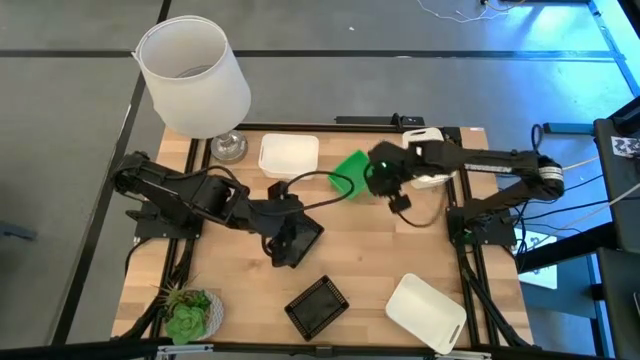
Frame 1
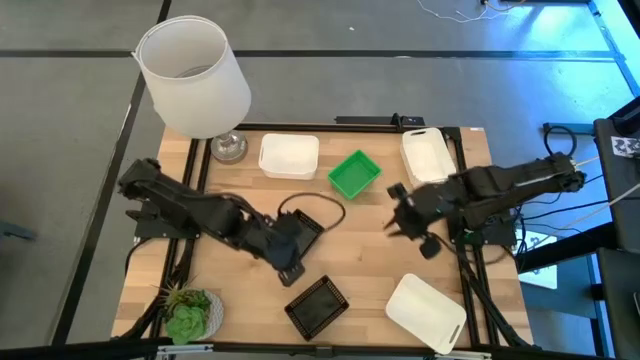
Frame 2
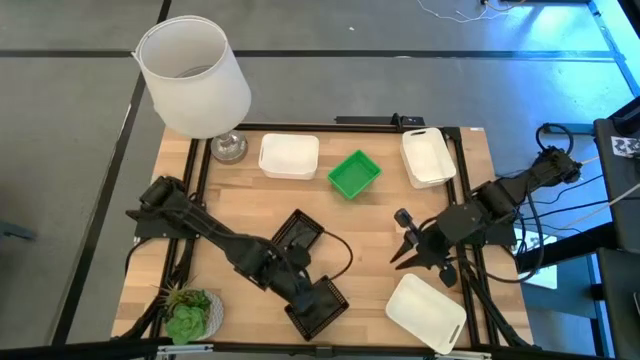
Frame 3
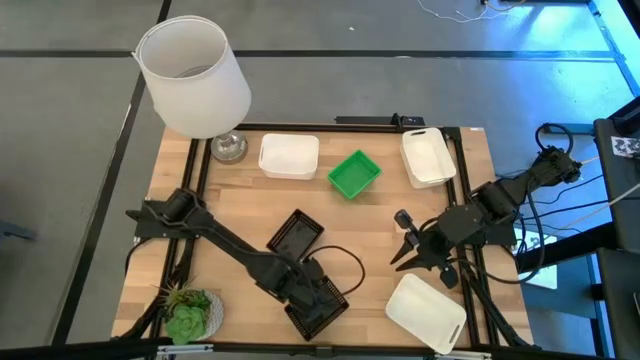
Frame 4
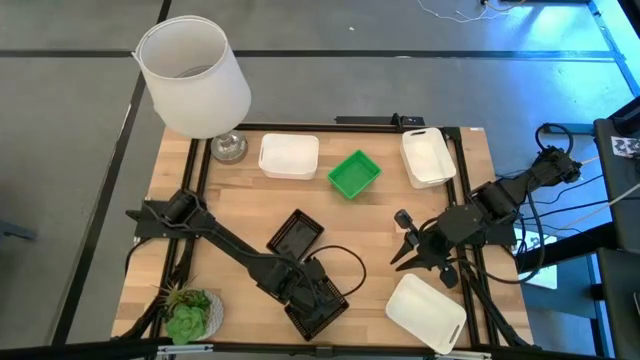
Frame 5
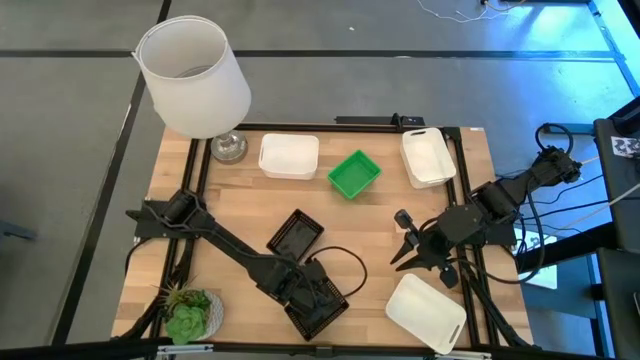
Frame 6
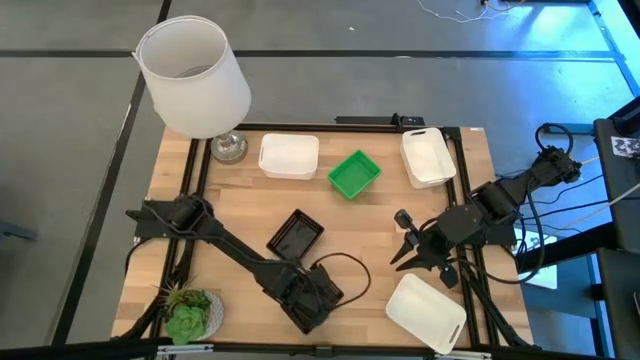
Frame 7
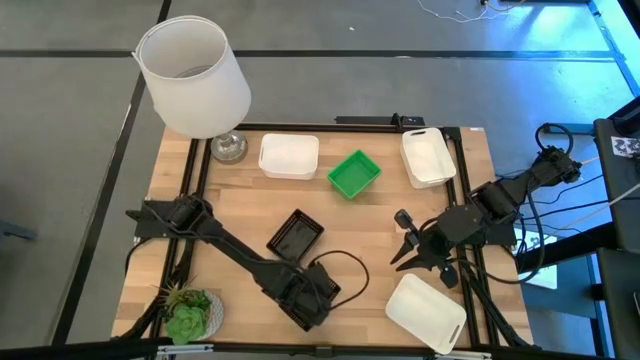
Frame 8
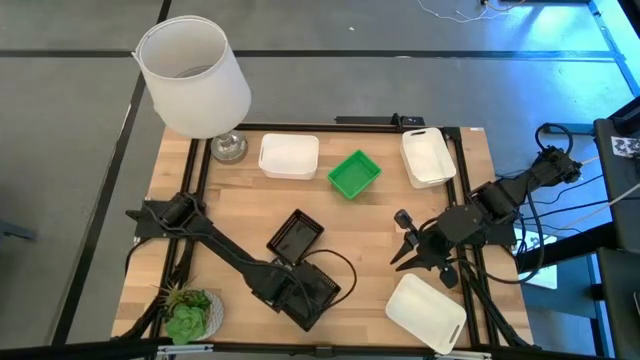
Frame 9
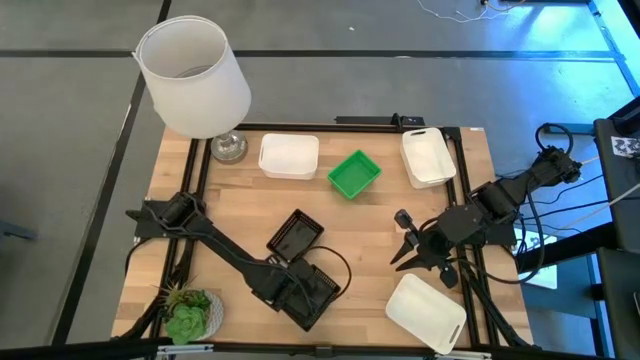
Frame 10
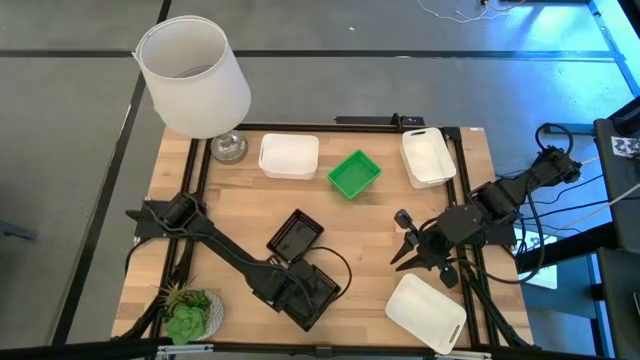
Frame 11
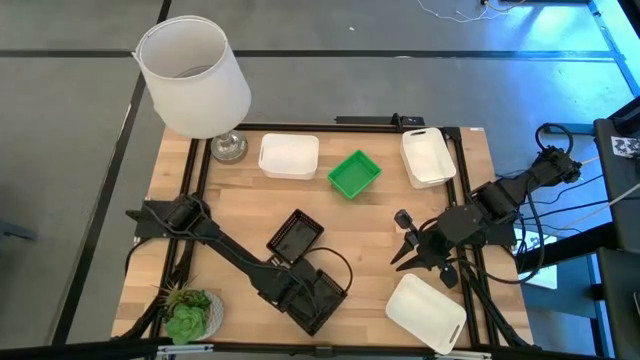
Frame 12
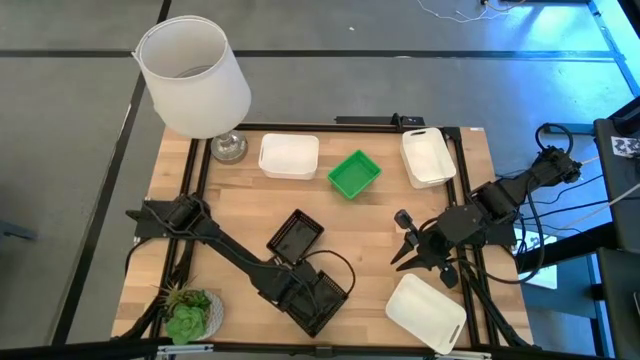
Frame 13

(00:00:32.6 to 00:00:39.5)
Stack the bottom black bin on the stacked black bins

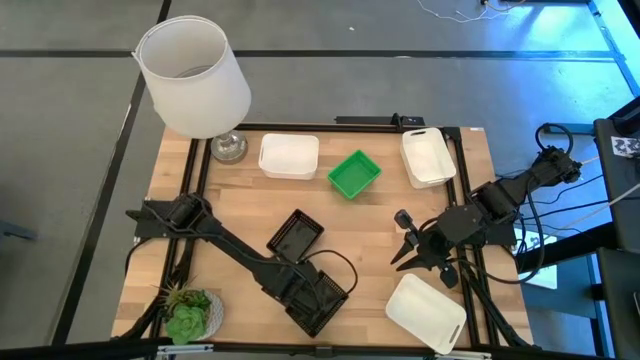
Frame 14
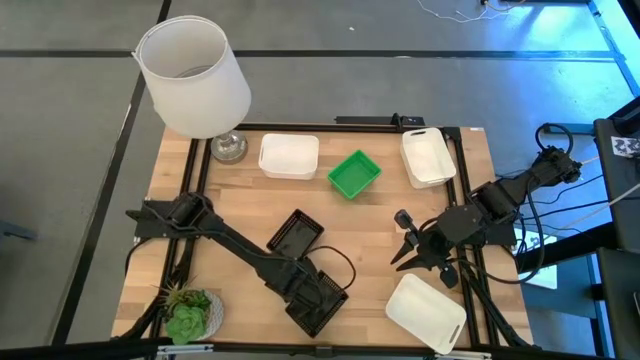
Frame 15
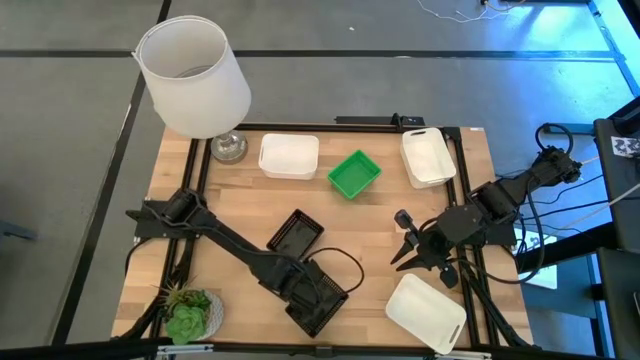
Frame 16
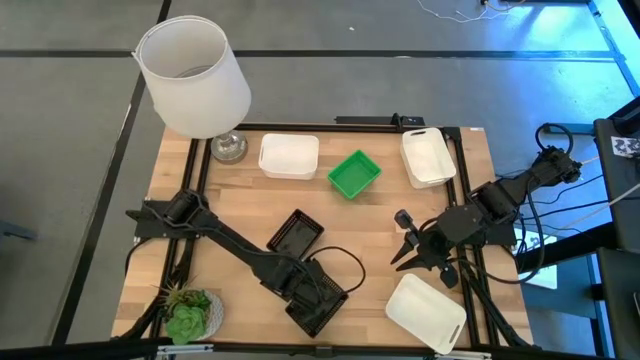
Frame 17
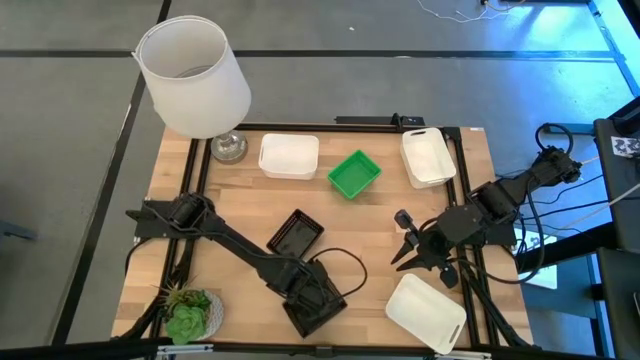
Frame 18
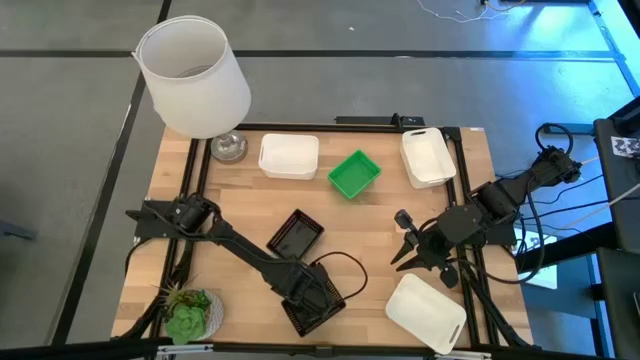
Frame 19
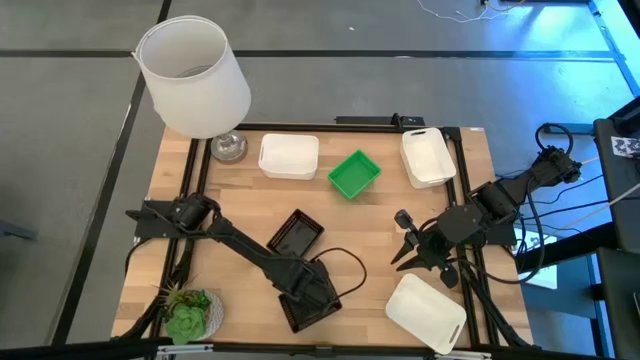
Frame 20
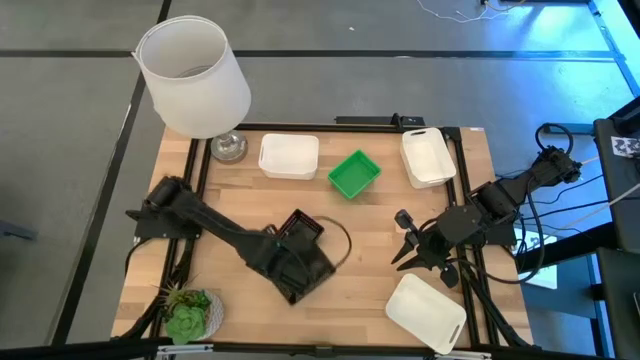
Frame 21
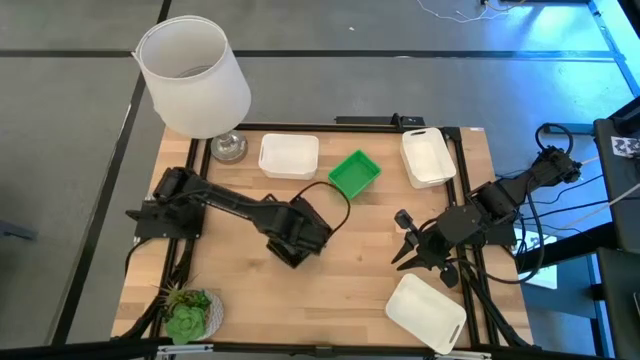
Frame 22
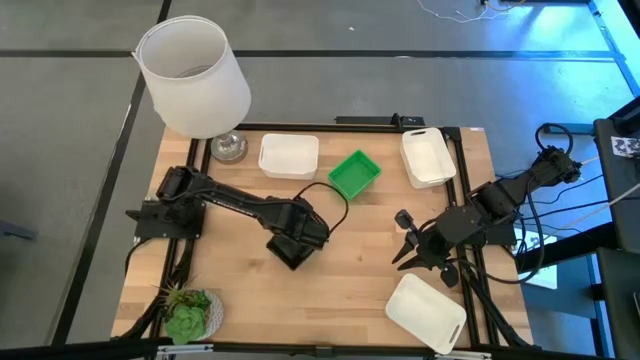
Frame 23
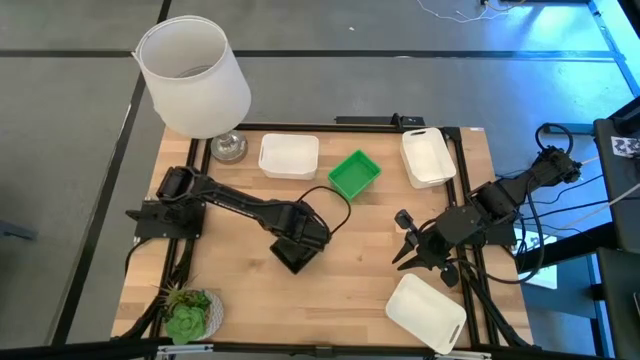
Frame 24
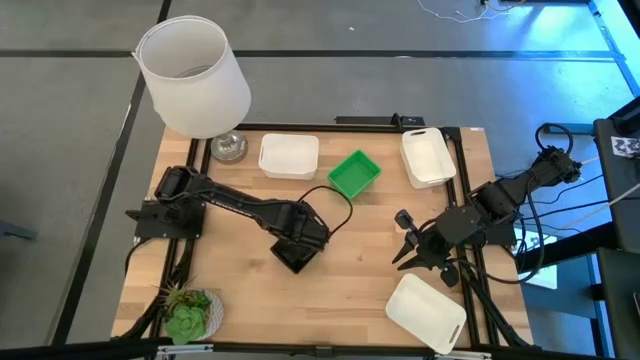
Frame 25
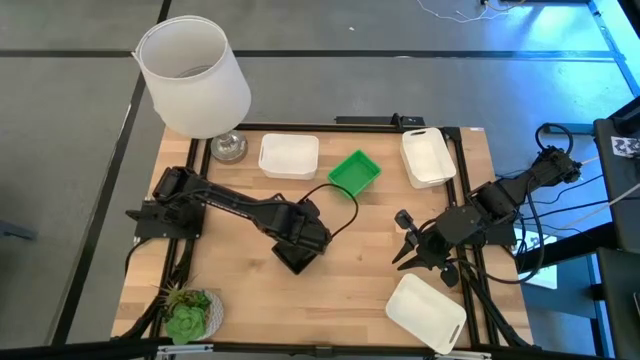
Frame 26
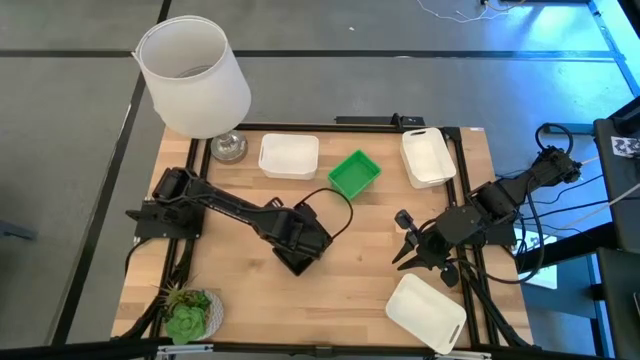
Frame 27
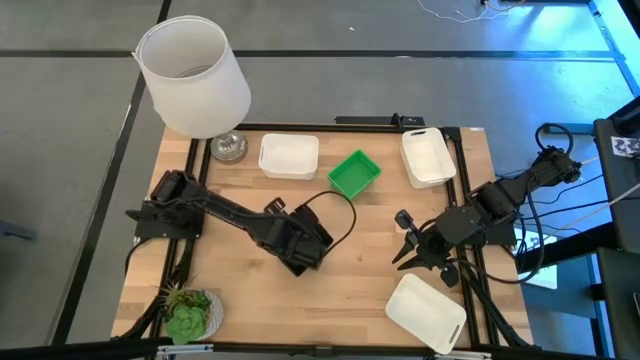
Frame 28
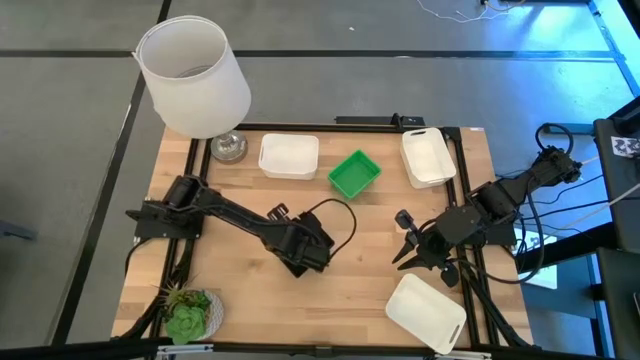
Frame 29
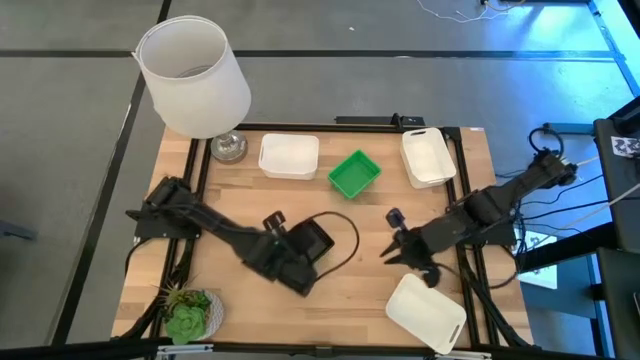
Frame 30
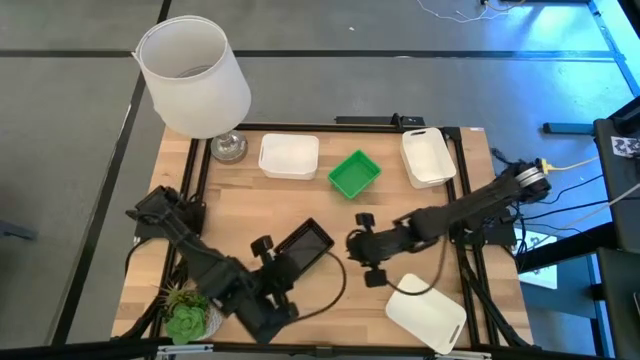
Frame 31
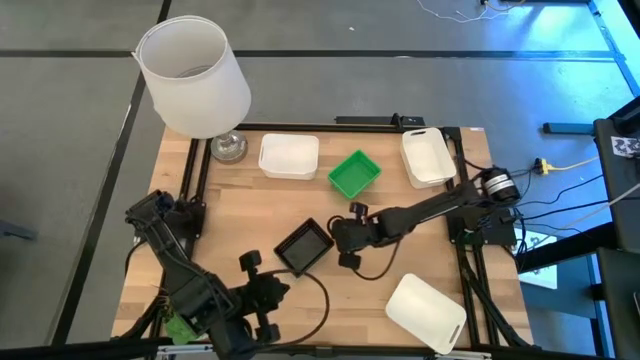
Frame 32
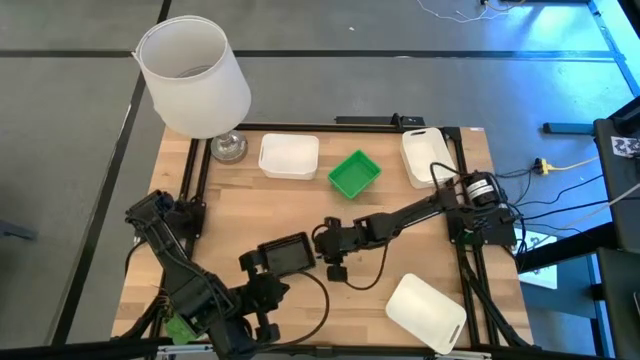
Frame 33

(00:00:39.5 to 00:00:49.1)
Stack the bottom black bin on the stacked black bins

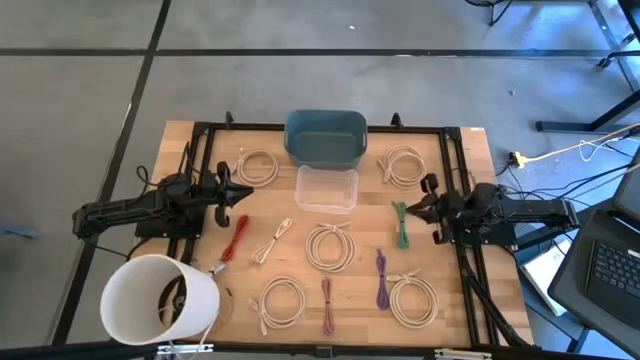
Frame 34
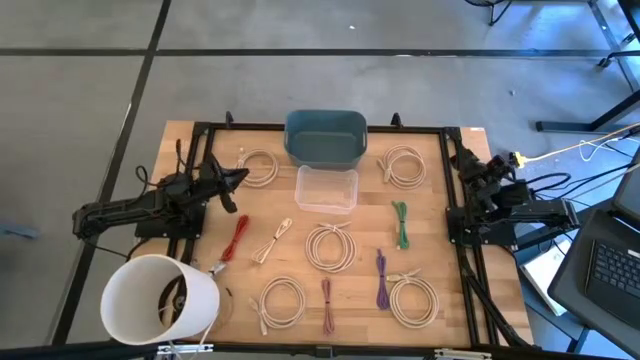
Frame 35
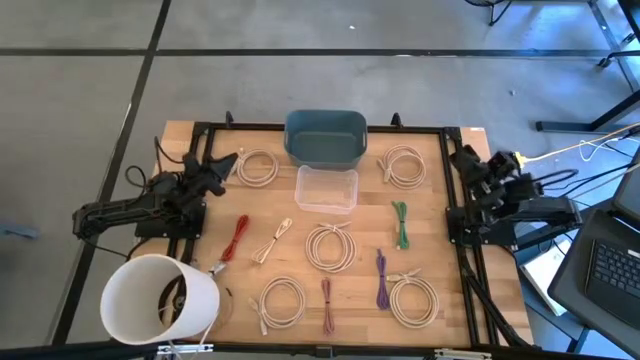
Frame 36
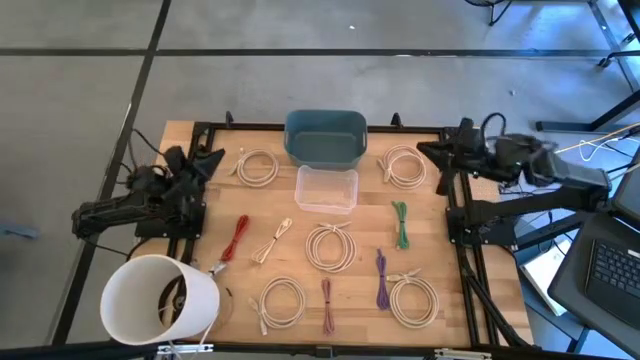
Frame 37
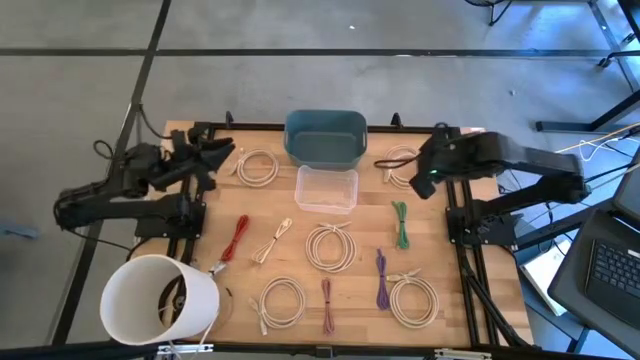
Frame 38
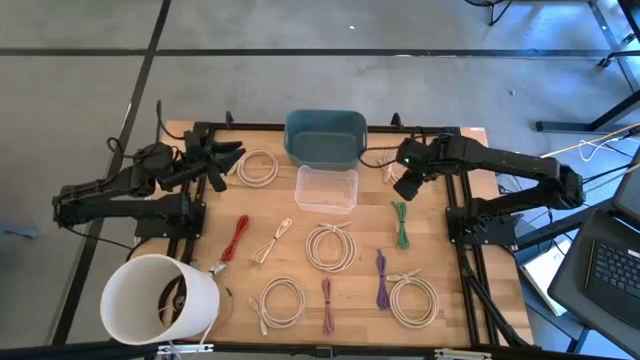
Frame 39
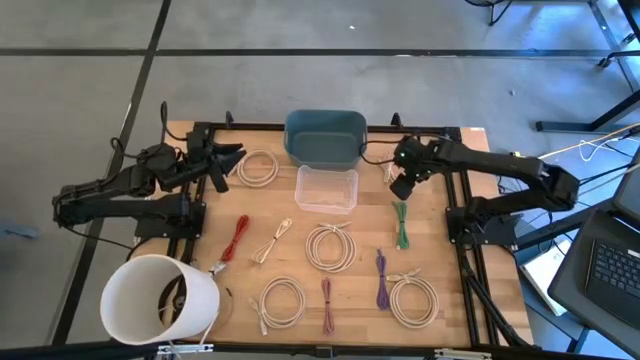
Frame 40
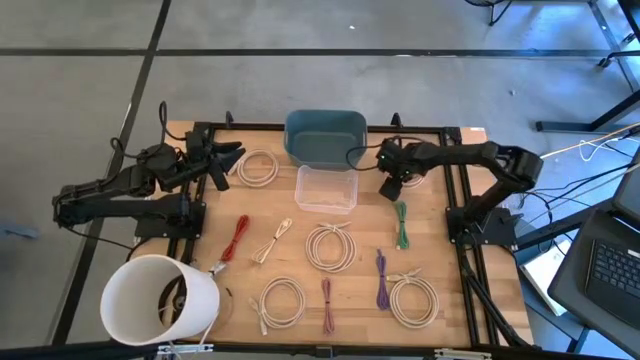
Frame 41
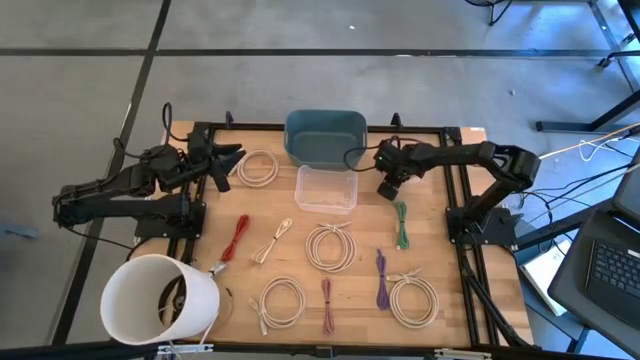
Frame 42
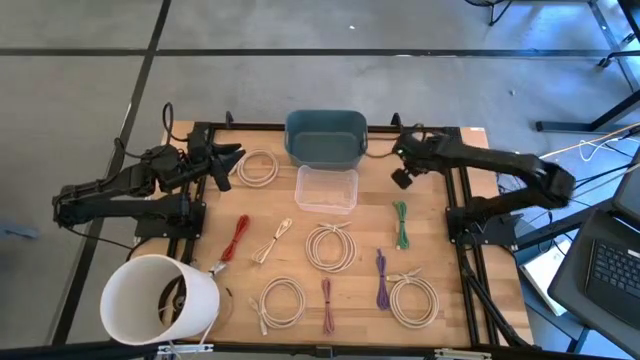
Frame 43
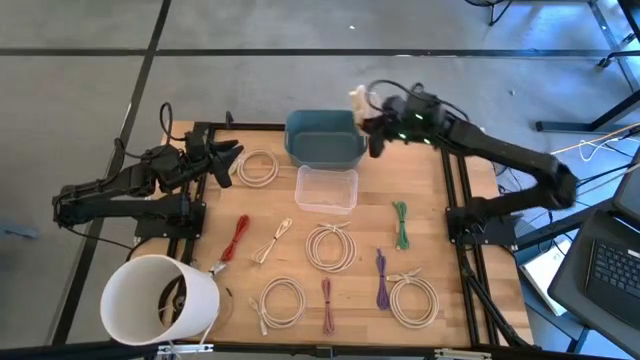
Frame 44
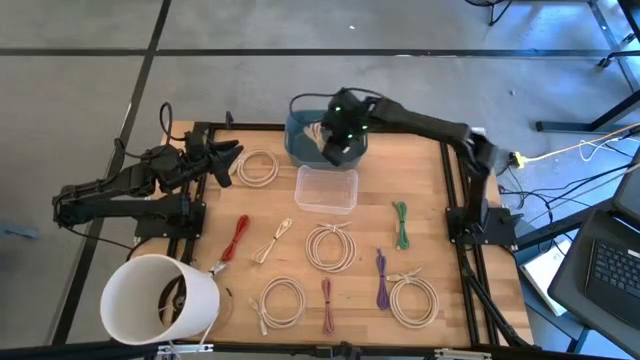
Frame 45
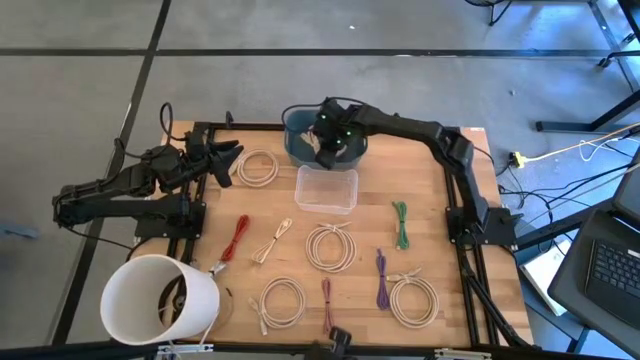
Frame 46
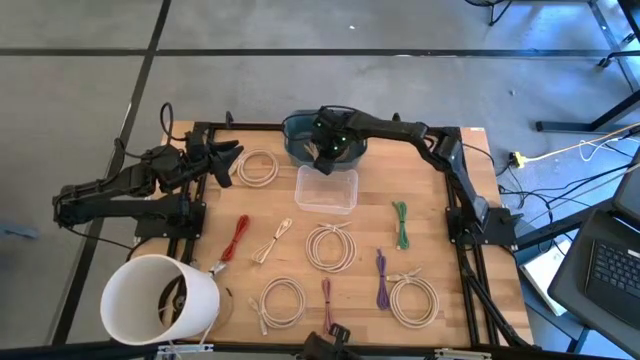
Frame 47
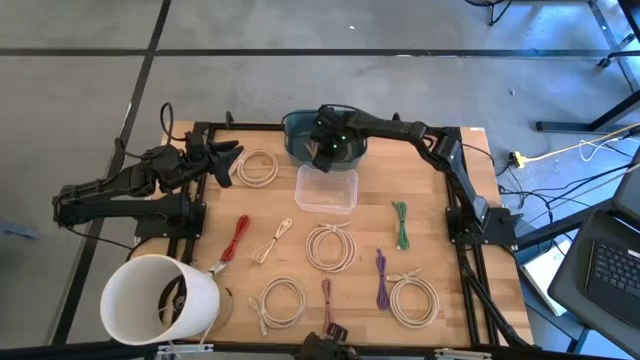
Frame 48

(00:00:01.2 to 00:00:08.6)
Put the brown HDMI cable into the blue bin
